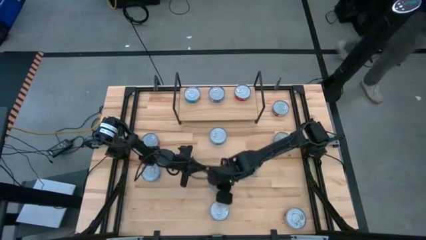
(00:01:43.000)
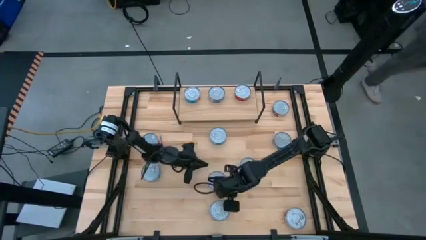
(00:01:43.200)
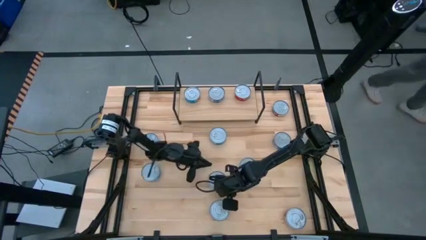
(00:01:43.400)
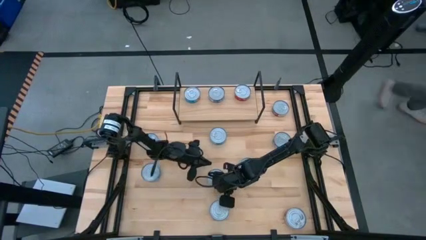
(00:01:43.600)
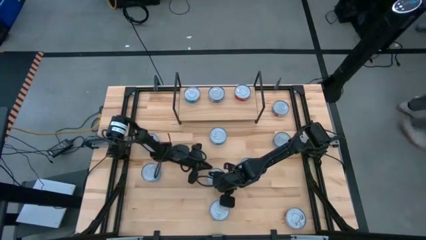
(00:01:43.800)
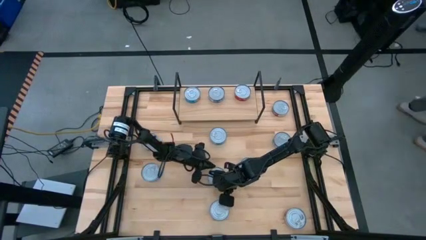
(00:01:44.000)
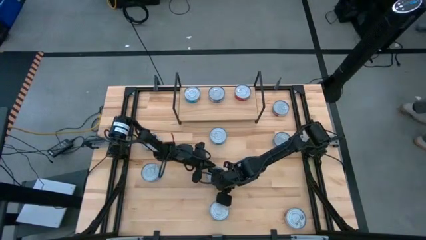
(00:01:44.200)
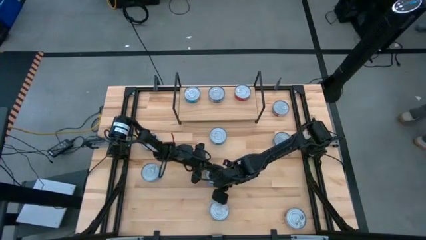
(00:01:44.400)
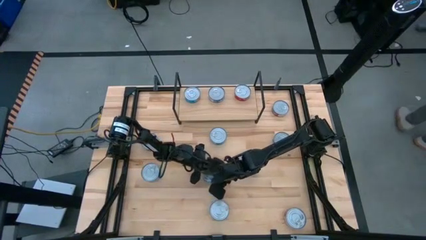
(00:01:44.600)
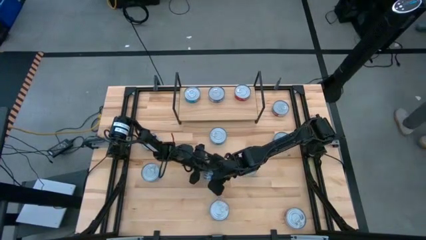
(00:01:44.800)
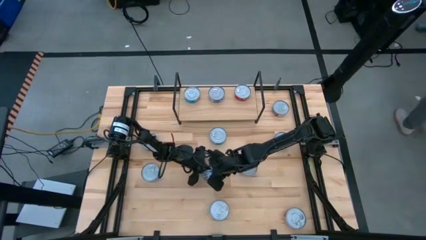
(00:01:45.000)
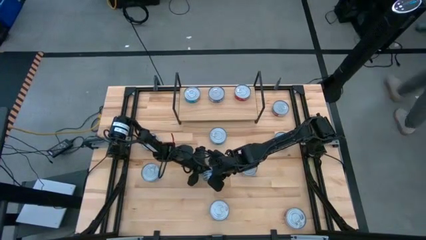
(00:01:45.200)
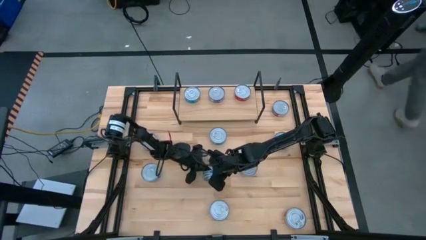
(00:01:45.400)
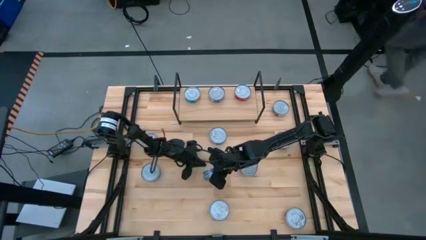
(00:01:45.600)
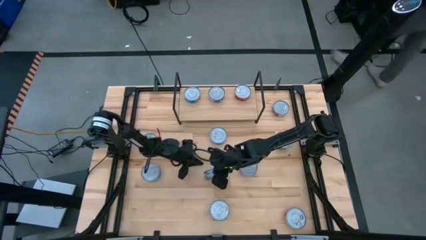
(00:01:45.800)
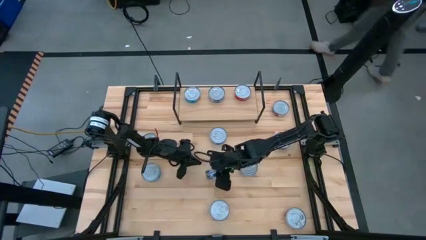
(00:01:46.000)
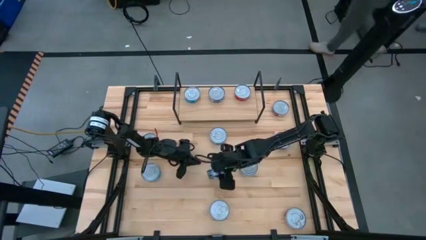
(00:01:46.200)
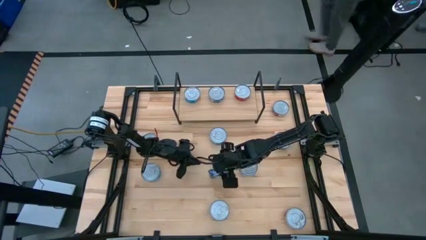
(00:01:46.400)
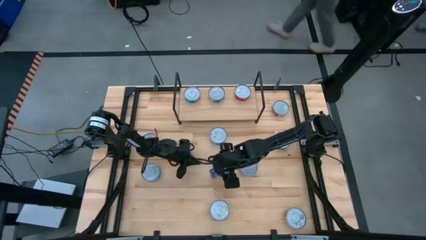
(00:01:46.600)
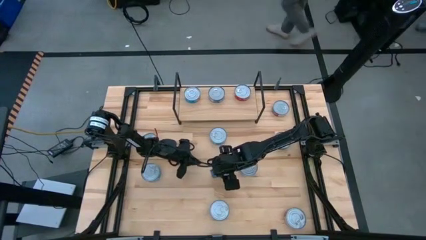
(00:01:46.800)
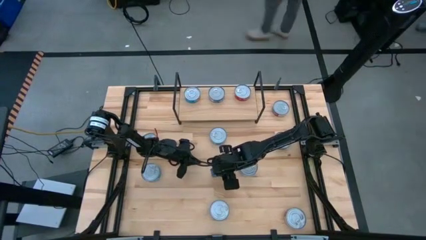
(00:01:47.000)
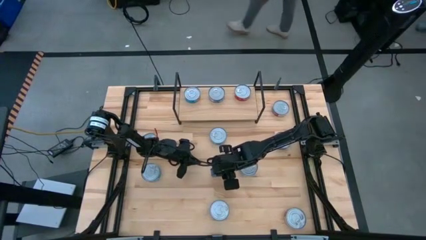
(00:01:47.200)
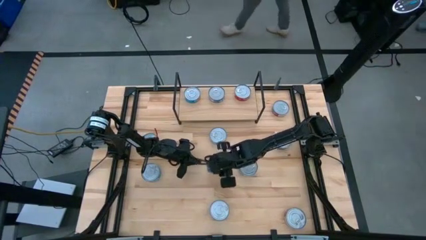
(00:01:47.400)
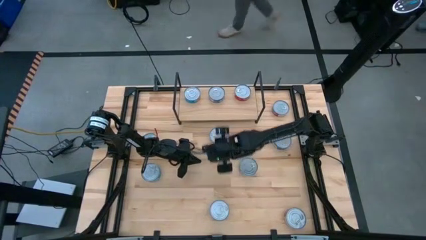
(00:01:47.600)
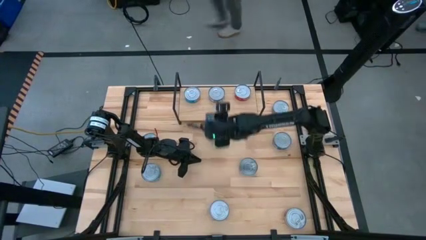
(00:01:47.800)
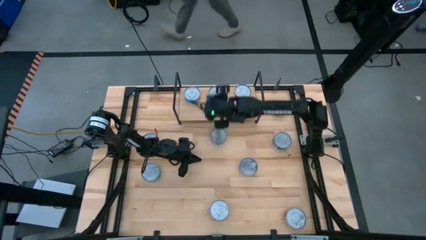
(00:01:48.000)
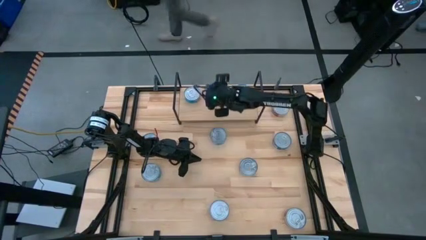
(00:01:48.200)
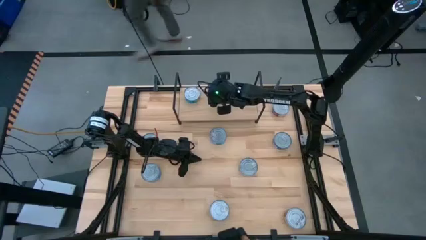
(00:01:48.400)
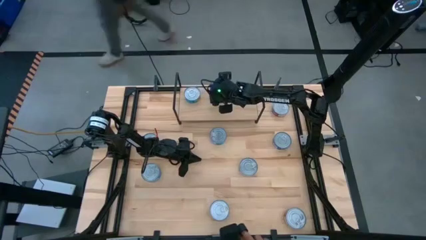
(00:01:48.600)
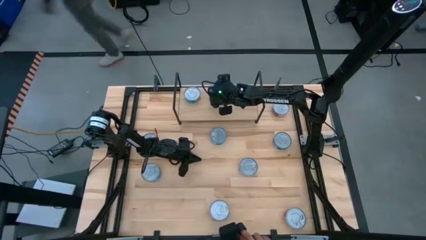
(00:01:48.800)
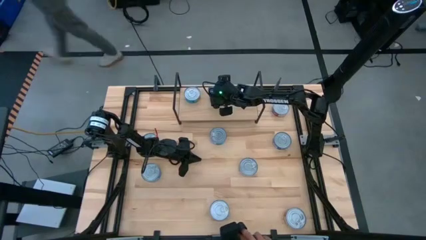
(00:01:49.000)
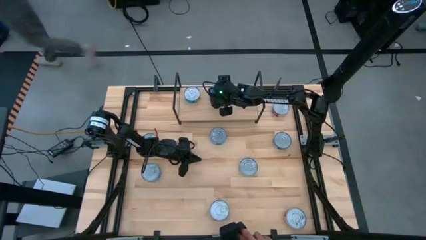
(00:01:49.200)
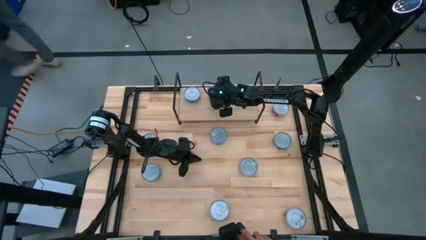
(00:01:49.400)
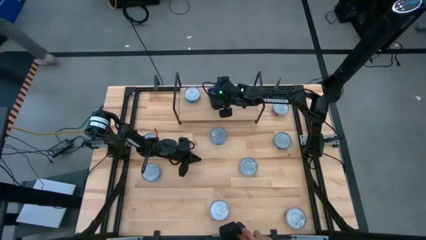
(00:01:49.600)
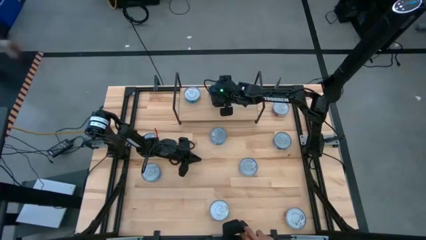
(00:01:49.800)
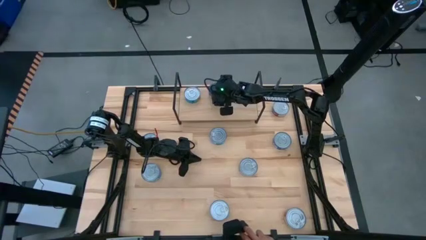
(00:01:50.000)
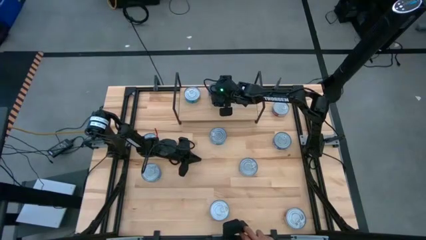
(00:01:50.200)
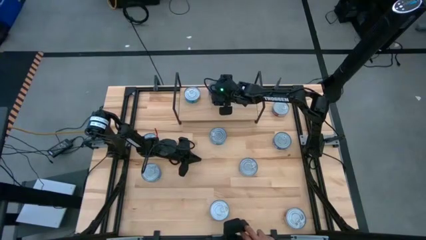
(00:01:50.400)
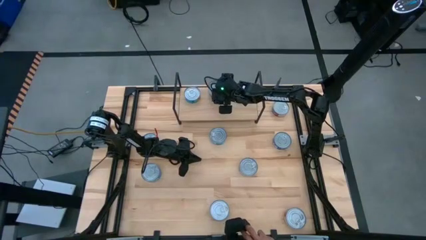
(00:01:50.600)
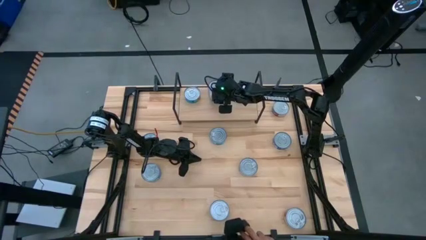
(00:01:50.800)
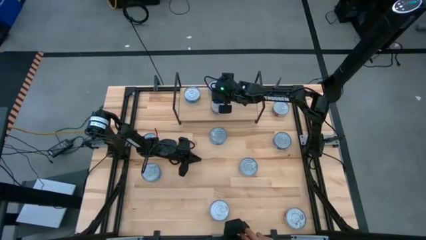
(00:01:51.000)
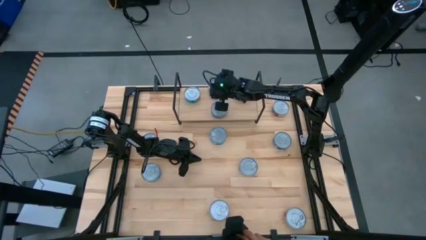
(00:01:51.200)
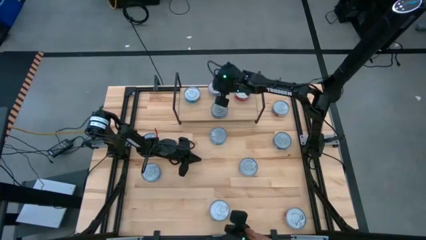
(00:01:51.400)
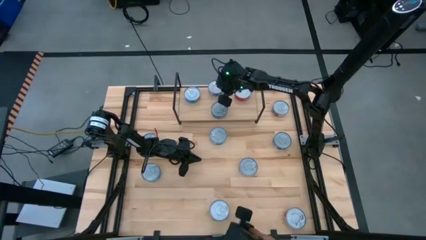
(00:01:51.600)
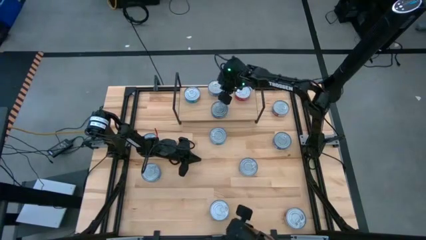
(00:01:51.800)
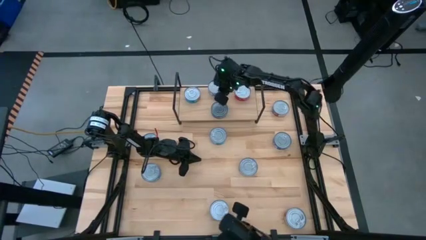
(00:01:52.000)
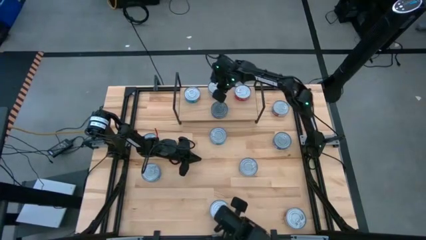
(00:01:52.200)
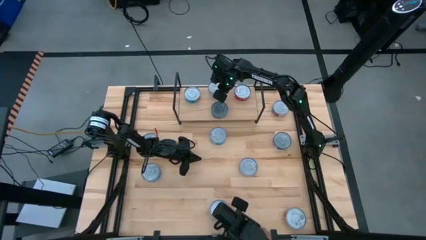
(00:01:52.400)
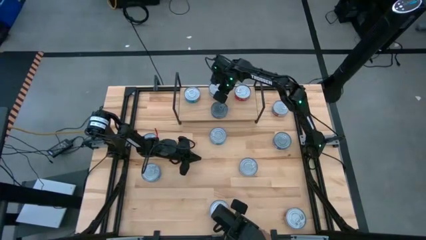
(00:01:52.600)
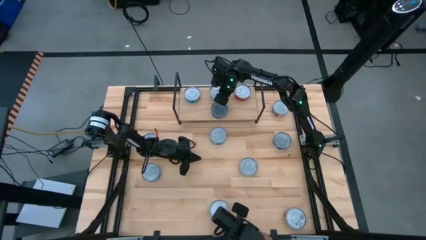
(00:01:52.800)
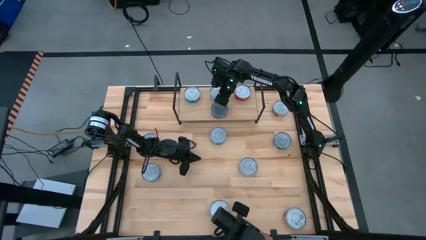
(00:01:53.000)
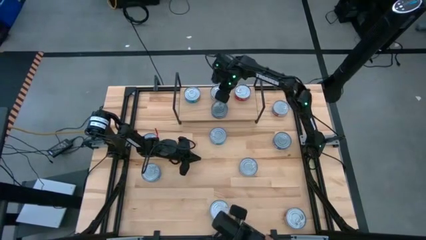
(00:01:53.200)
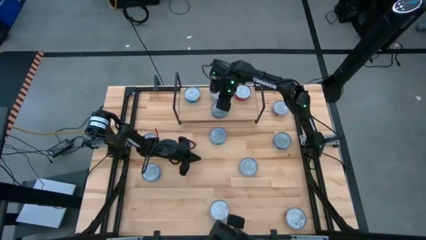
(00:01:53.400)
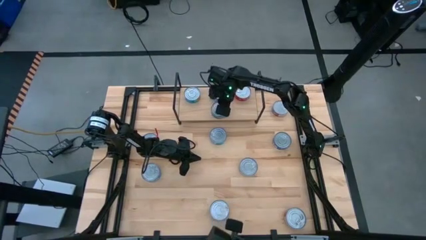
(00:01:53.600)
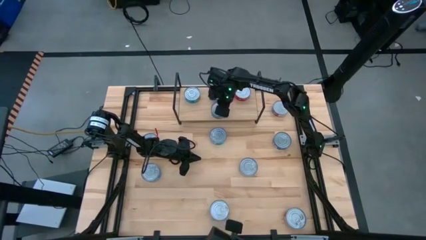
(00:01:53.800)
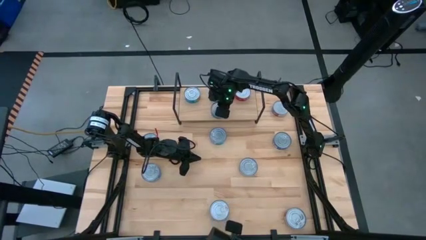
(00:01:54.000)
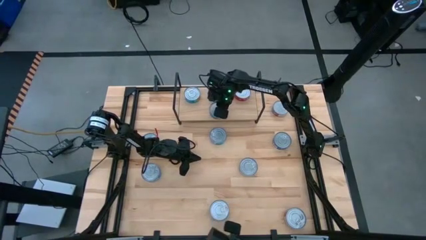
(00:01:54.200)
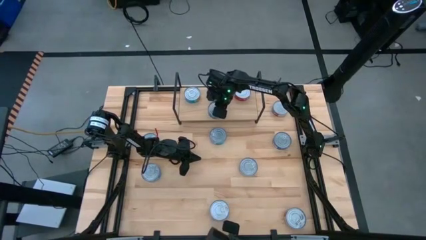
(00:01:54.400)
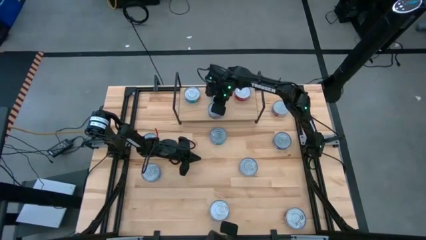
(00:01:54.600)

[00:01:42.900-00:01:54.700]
Task: Stack canned seafood by type on shelf
Put the center blue tuna can on the shelf aligned with the other tuna can

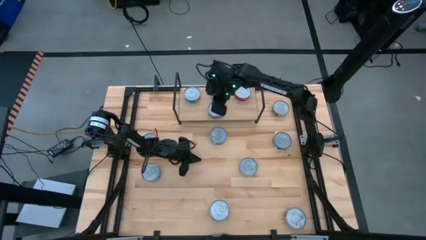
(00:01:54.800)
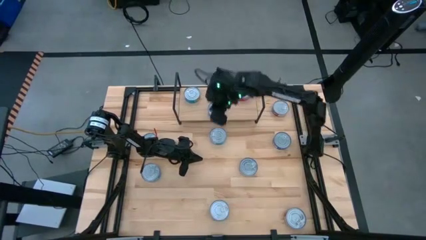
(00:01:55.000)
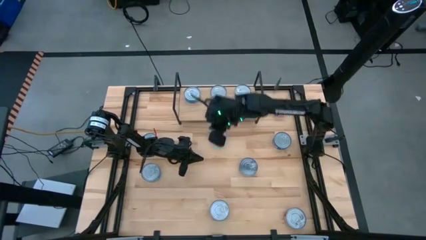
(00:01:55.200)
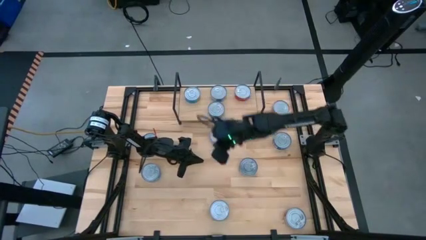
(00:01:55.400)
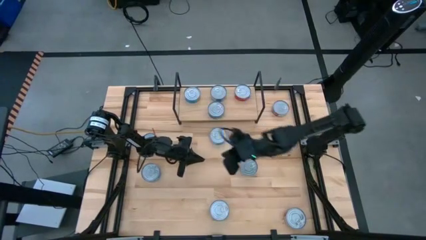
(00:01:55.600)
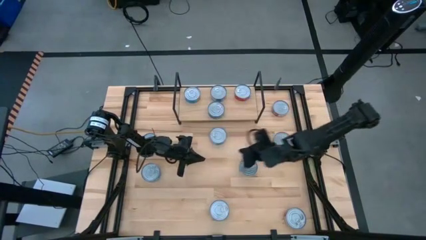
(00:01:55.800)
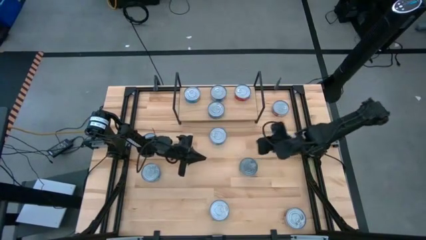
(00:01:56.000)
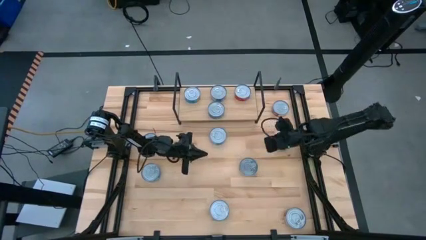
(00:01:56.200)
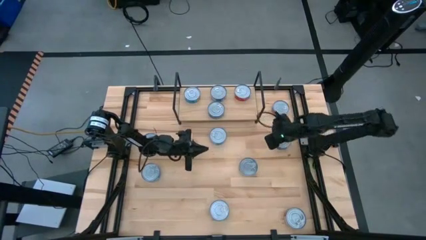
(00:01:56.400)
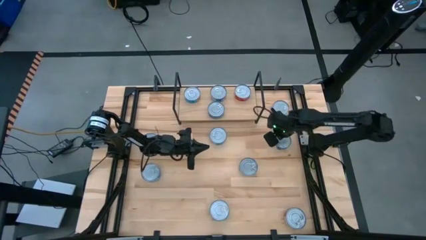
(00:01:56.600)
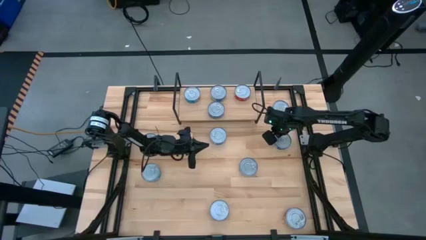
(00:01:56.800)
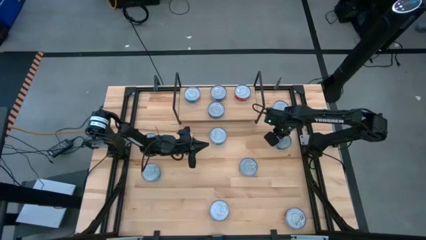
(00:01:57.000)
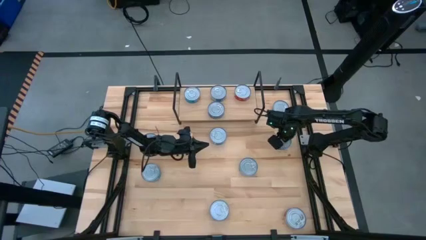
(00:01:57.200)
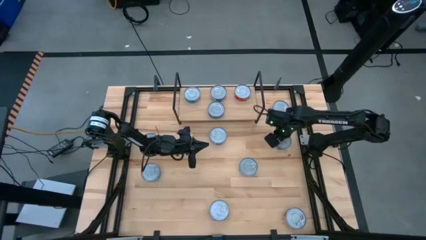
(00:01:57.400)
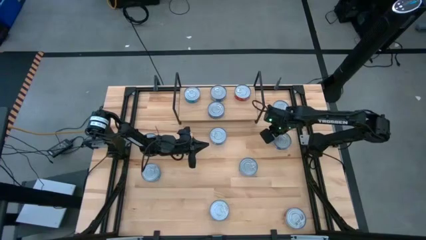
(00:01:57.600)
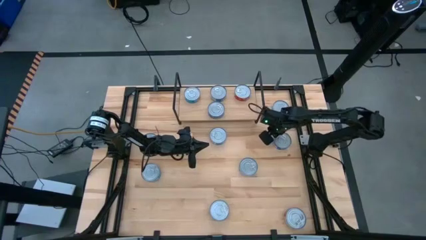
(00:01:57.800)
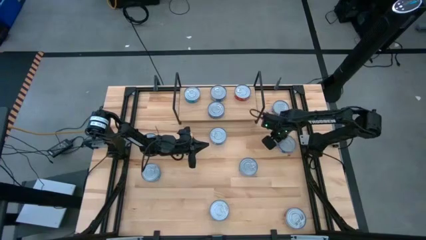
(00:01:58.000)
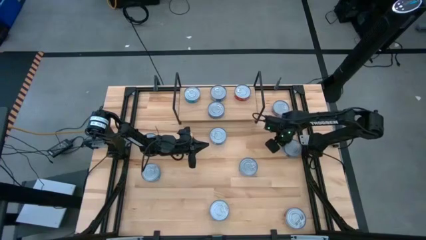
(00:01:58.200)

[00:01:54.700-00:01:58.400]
Adjust the top right blue tuna can
